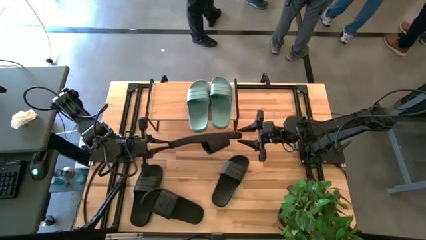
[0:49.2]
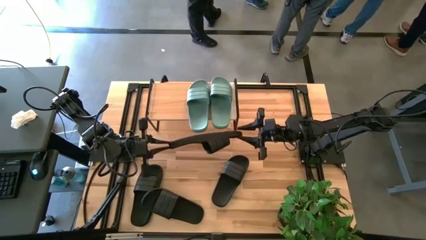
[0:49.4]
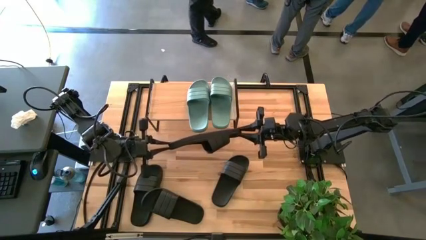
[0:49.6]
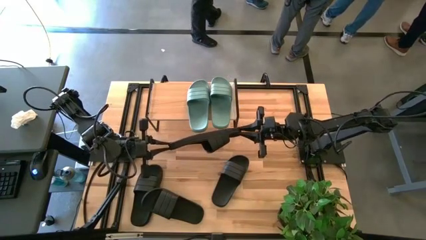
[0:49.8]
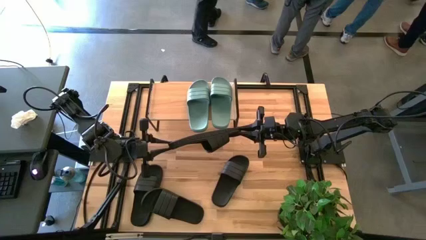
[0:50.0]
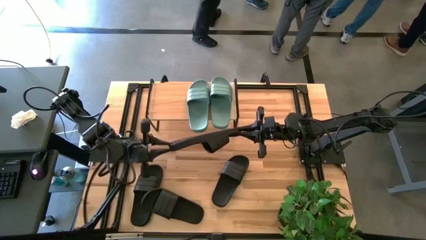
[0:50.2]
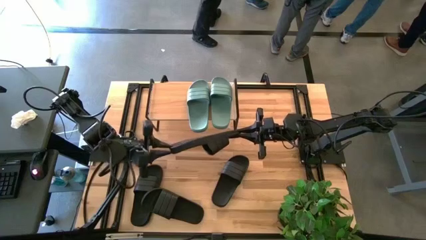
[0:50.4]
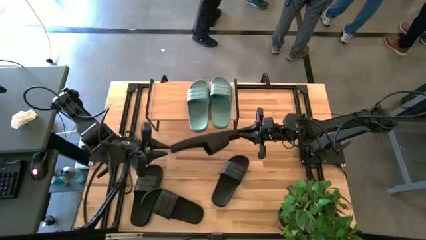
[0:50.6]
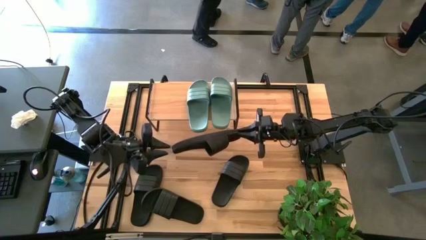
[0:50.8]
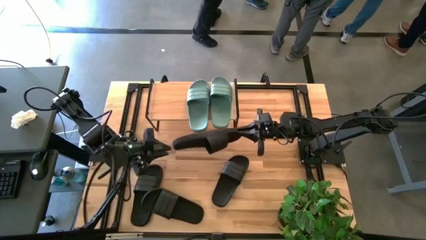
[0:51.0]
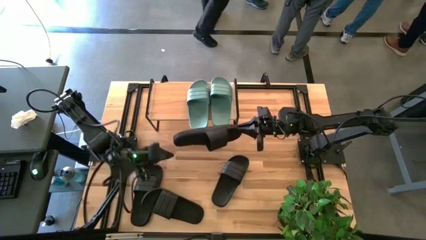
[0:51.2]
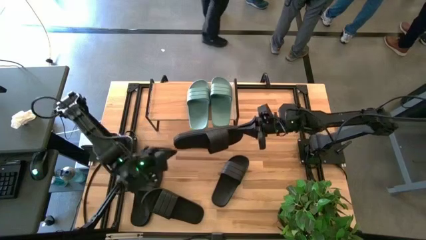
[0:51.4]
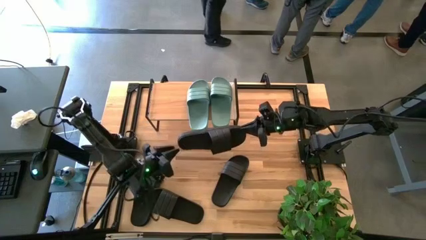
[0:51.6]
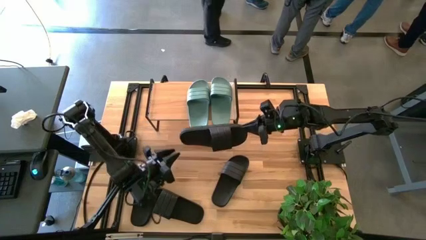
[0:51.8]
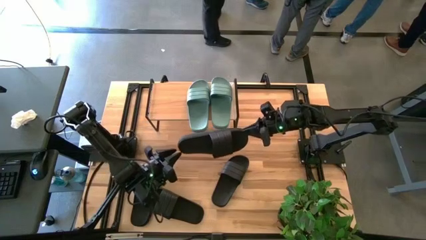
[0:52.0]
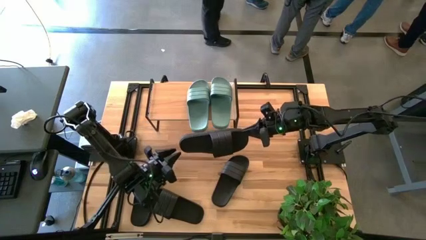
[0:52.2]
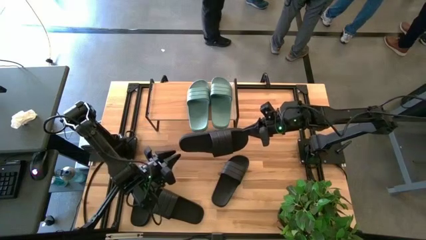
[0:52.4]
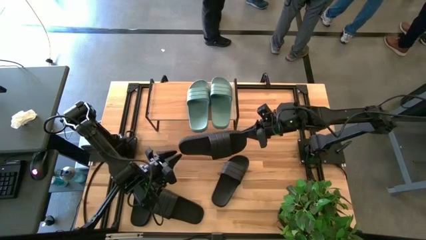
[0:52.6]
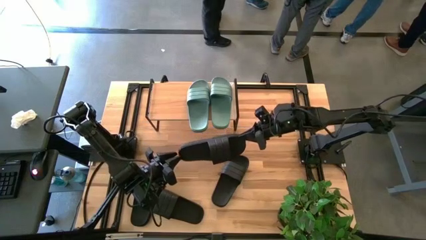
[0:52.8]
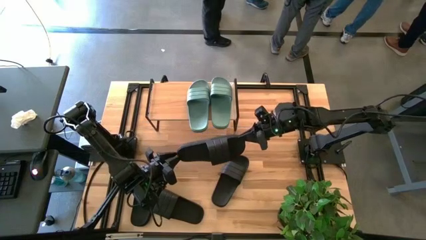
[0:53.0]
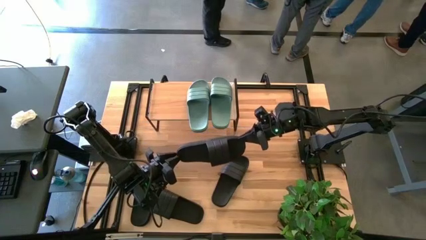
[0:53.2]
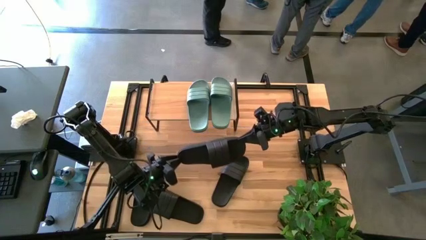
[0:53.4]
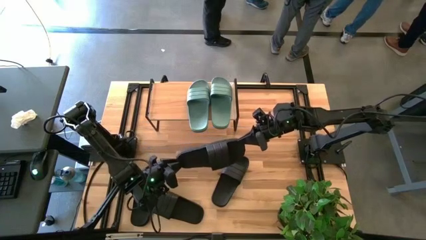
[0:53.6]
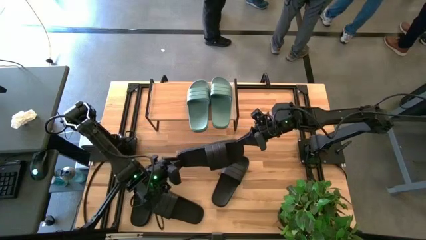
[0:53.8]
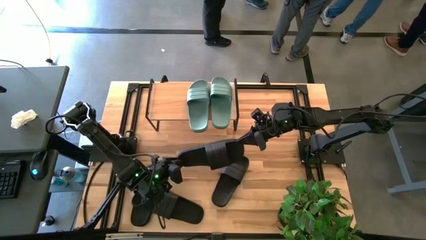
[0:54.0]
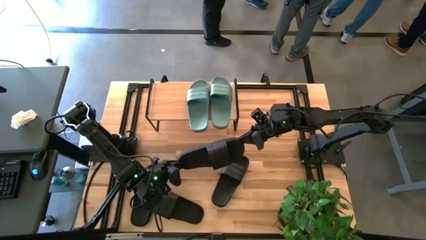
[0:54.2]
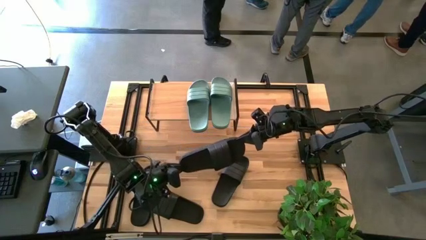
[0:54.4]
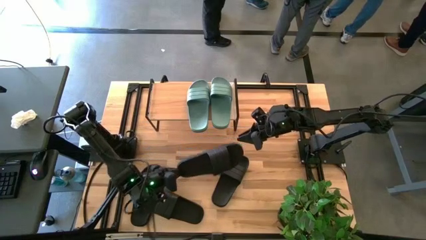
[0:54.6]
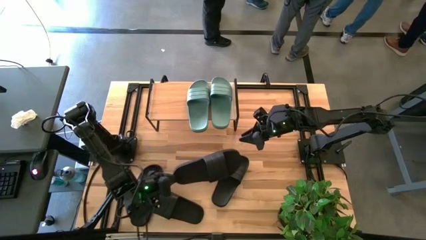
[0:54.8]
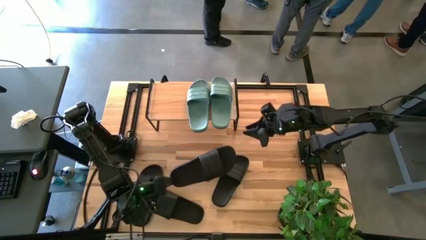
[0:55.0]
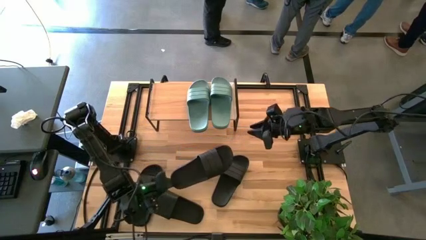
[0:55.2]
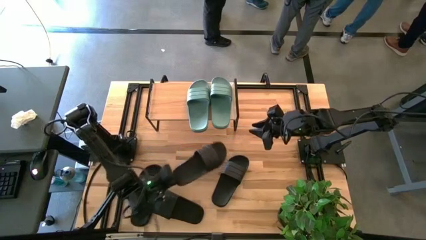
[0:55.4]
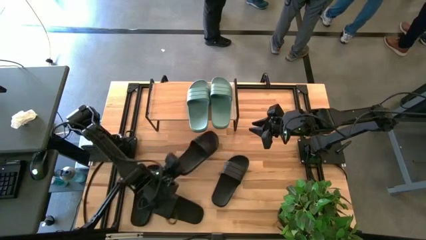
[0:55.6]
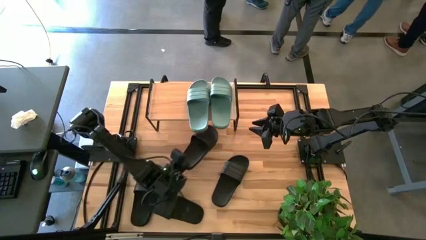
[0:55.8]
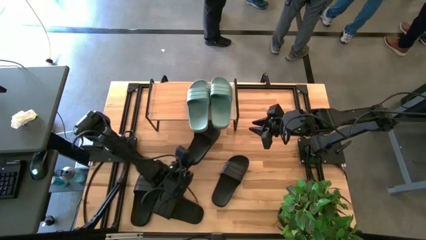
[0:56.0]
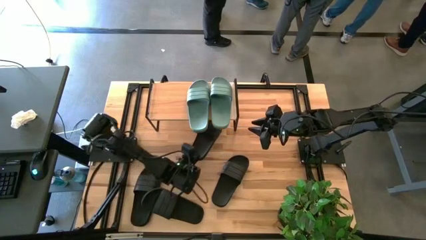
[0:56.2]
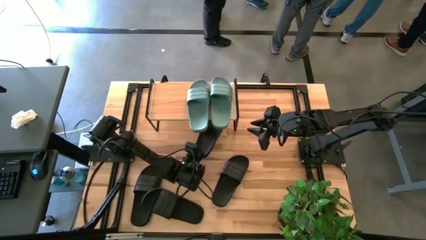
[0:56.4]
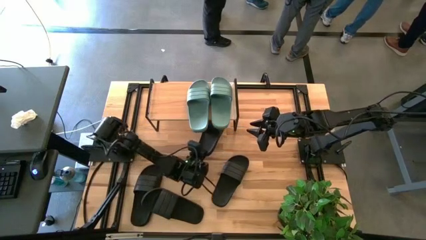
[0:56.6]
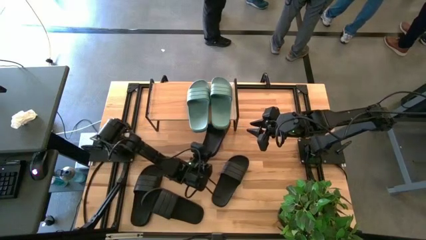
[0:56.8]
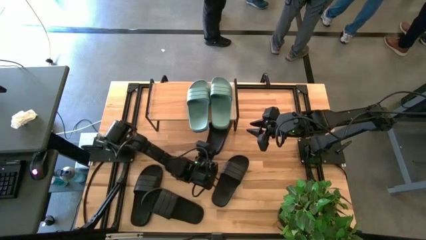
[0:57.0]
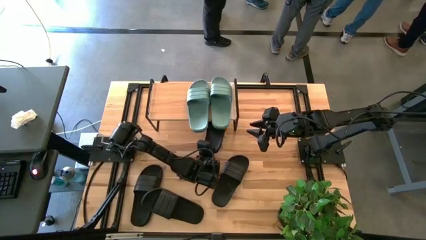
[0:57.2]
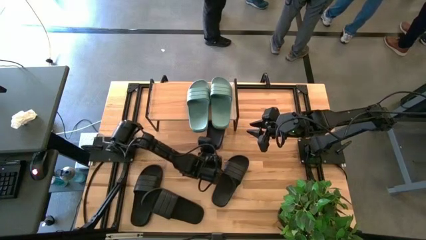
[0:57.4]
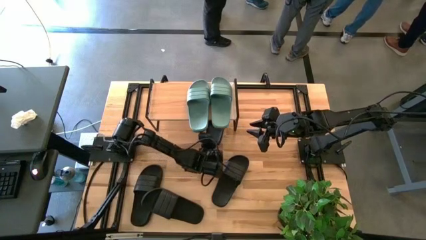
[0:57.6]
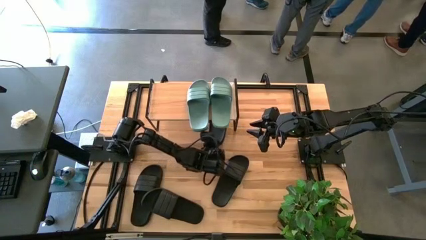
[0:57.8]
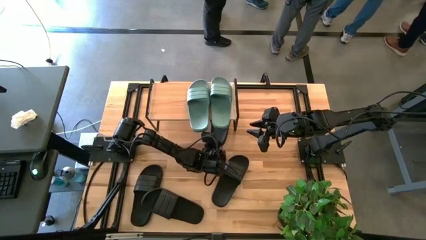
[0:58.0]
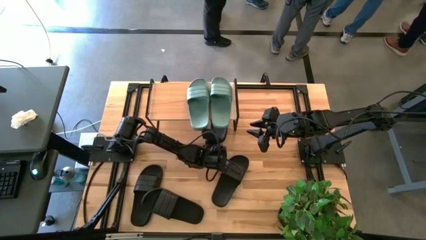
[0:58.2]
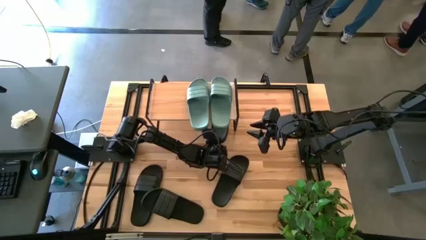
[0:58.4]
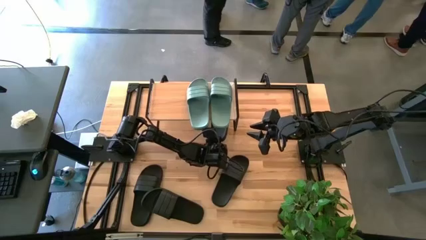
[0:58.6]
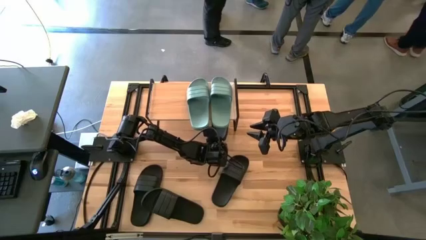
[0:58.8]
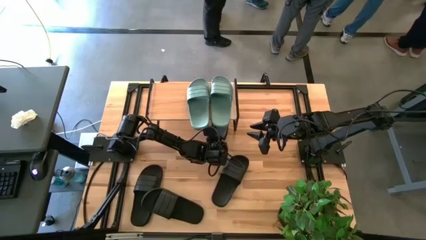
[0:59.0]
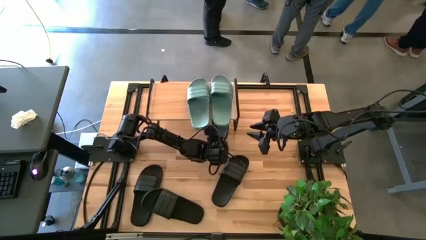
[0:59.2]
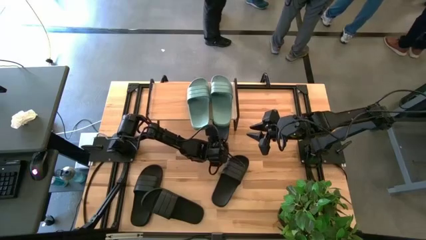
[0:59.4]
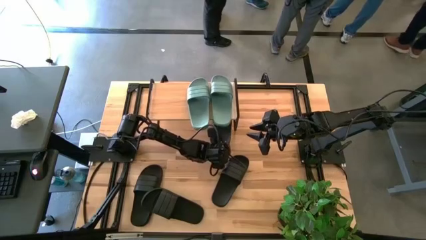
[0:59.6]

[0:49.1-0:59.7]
Task: Pick and place slides into the shelf
Put the black slide under the shelf

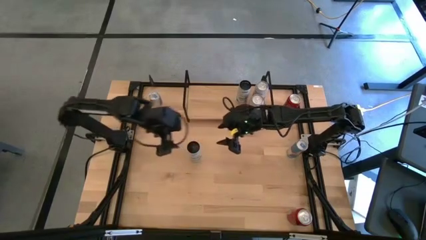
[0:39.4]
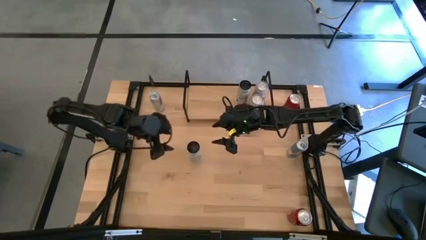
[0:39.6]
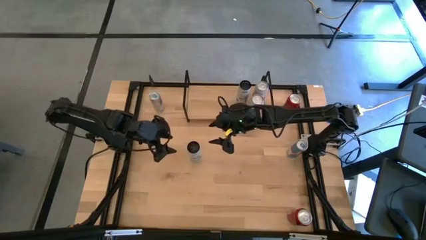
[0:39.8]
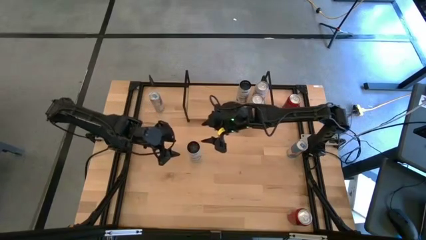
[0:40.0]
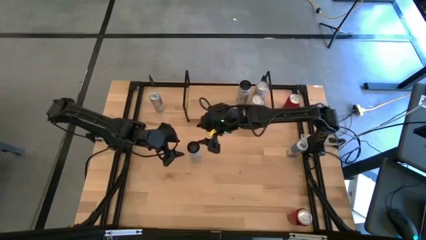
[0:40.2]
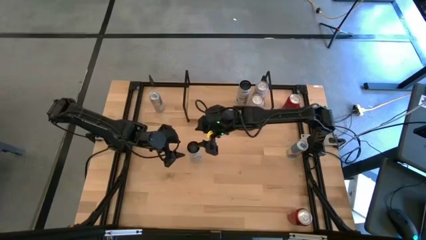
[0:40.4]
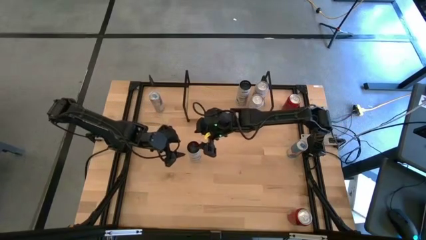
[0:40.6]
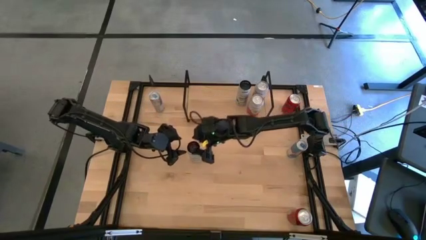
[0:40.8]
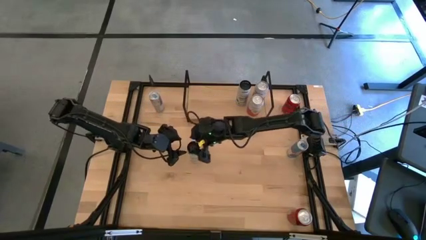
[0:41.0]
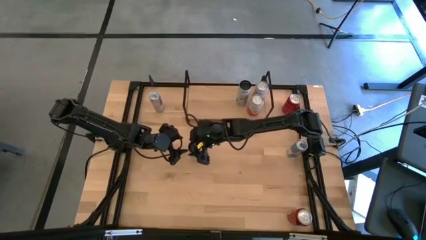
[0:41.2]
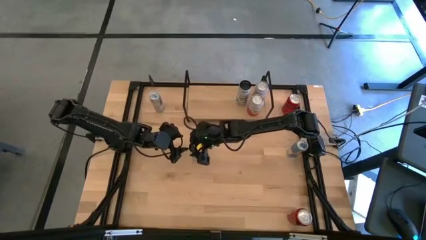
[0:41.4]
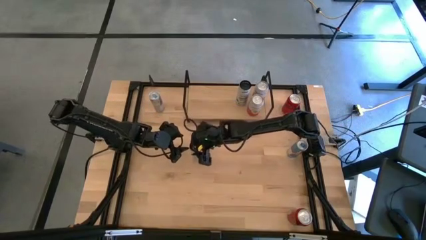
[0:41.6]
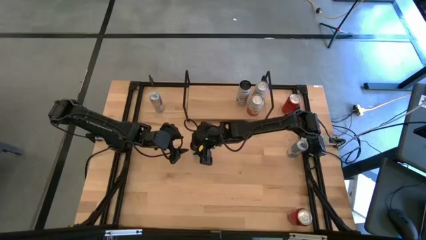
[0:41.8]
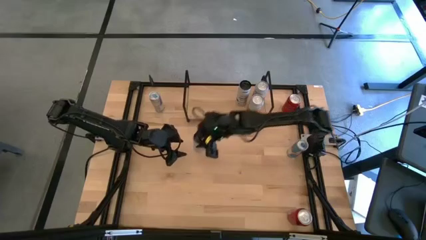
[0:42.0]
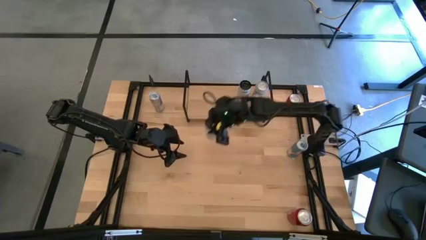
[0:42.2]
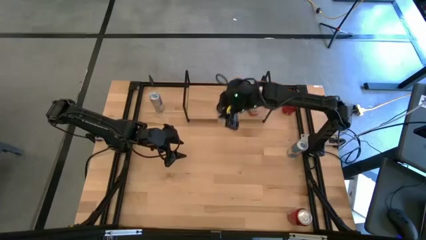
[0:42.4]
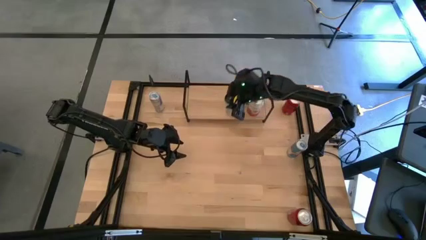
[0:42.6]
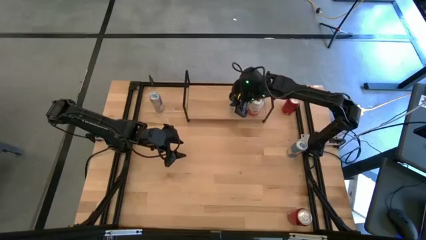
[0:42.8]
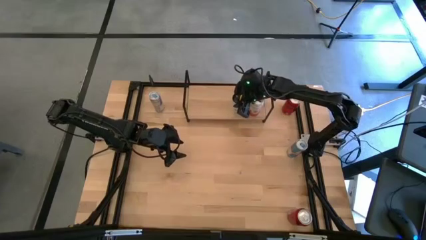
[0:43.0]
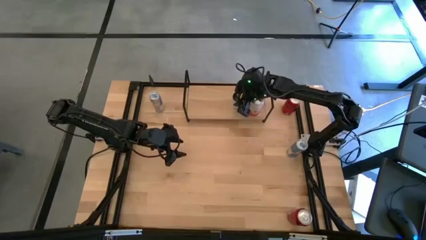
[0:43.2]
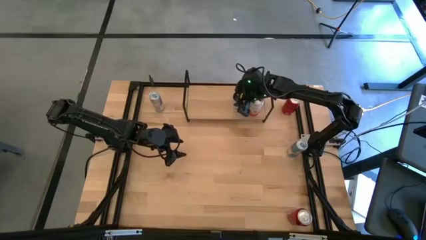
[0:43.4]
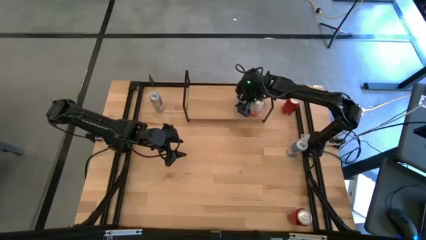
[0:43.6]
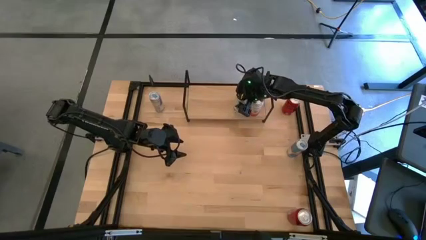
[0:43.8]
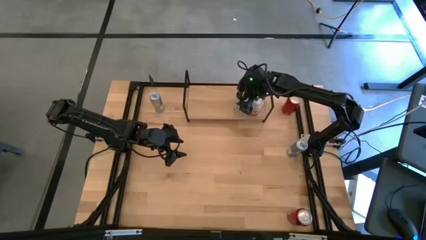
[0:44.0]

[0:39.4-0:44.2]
Task: Place canned beverage on shelf
Align the white and blue soda can with the other white and blue soda can on the shelf
